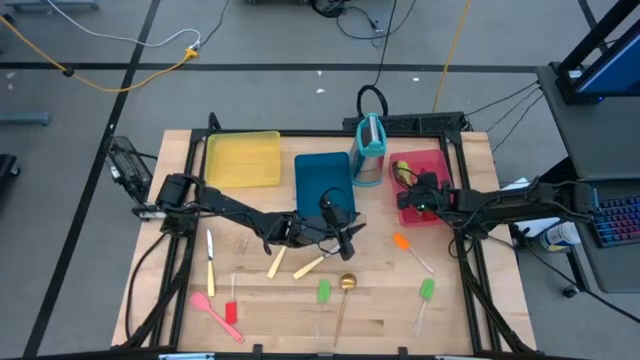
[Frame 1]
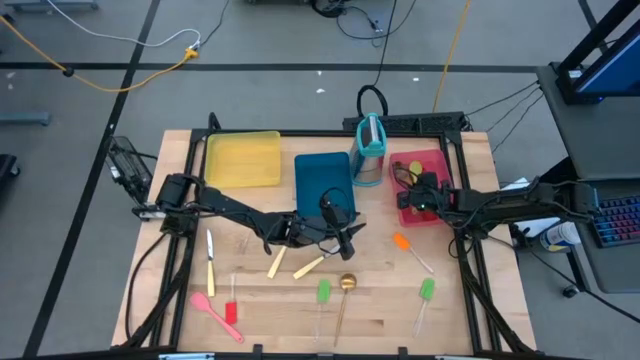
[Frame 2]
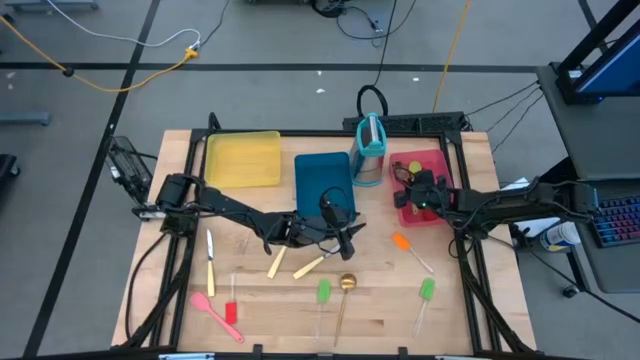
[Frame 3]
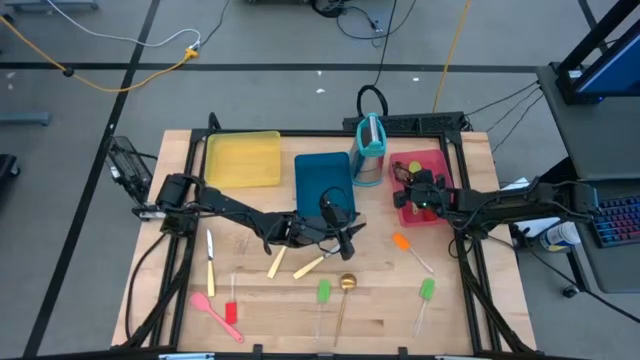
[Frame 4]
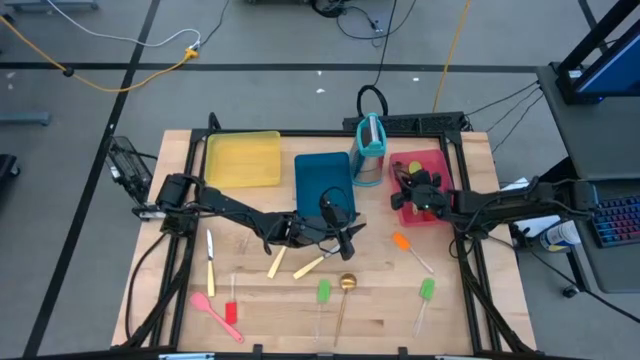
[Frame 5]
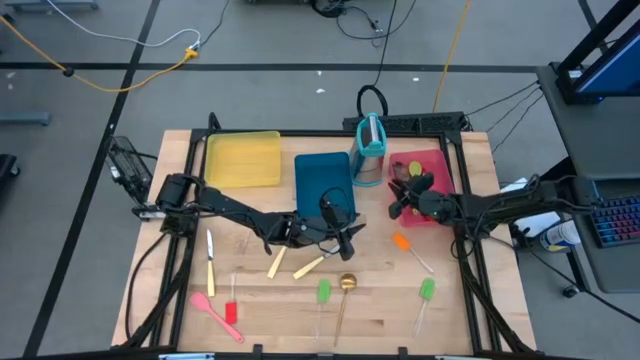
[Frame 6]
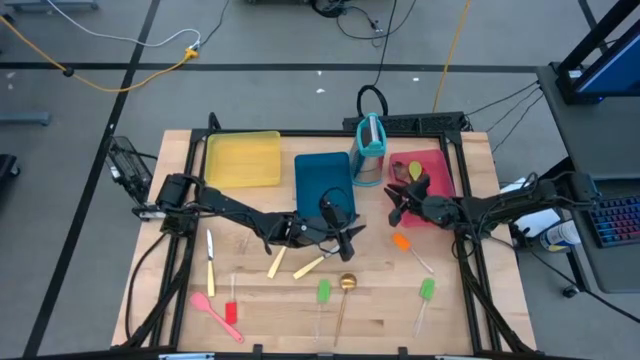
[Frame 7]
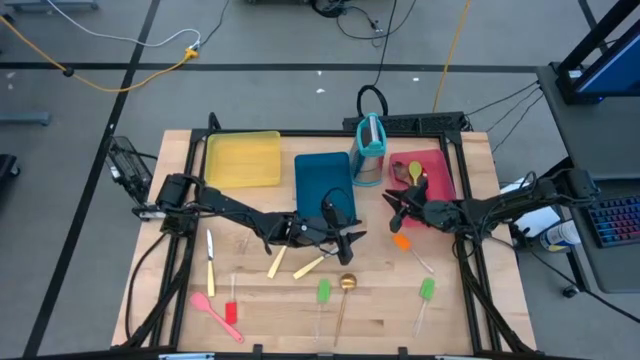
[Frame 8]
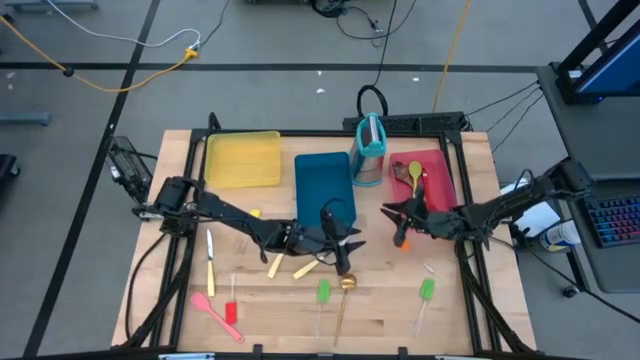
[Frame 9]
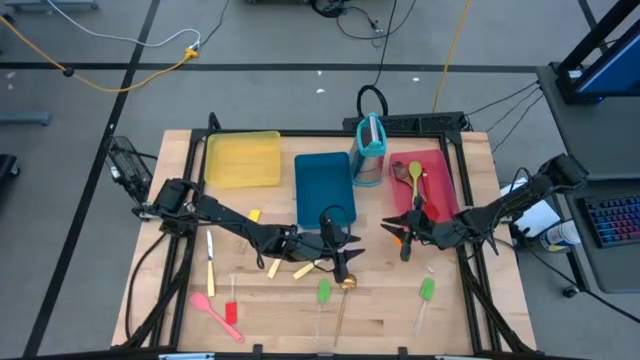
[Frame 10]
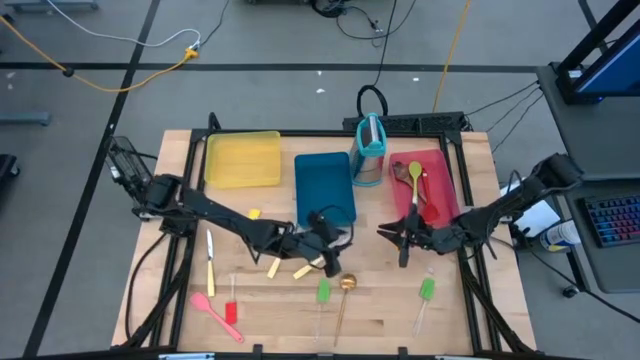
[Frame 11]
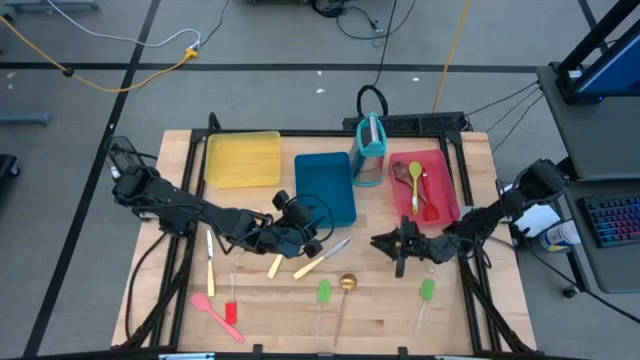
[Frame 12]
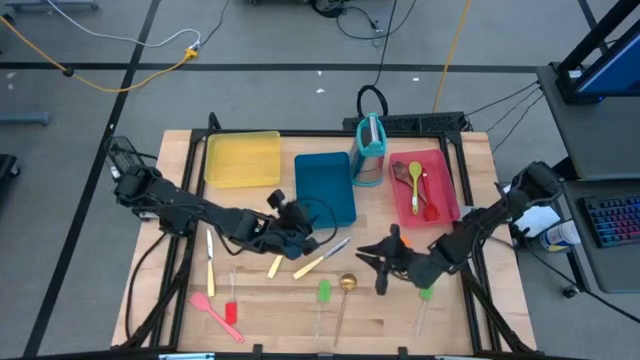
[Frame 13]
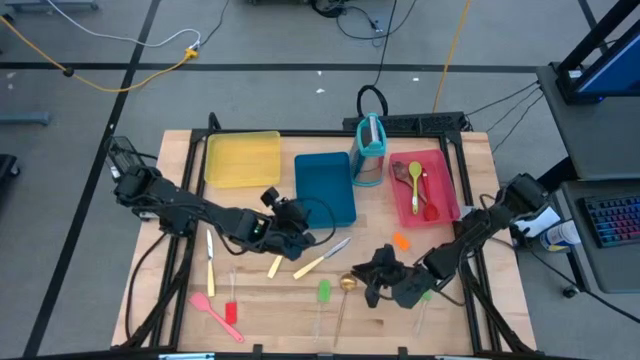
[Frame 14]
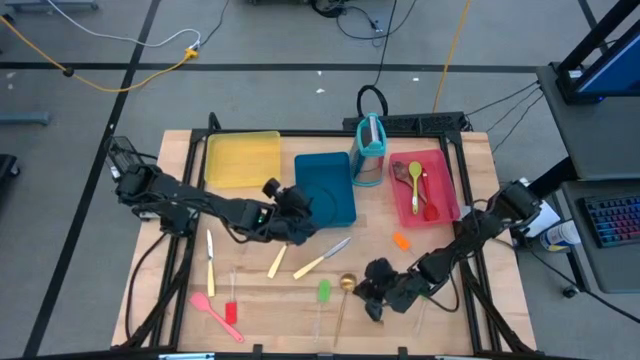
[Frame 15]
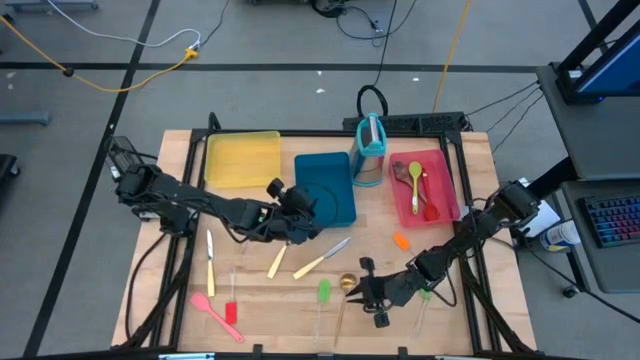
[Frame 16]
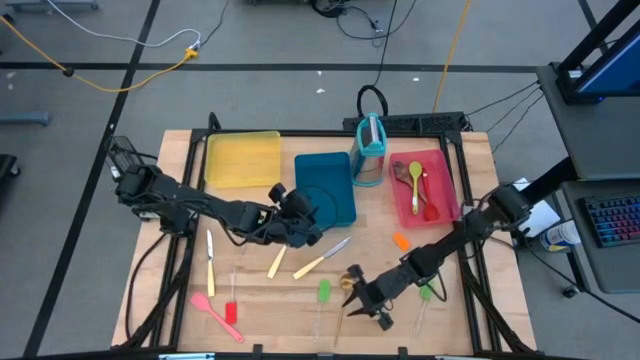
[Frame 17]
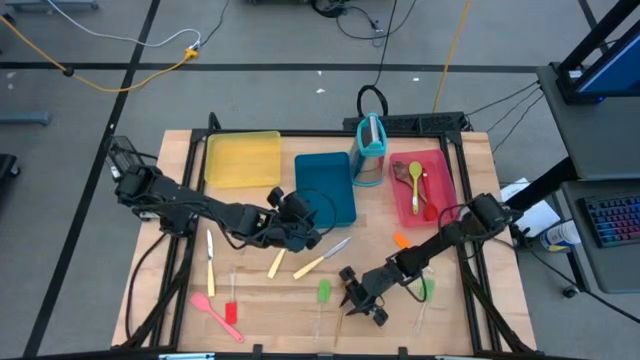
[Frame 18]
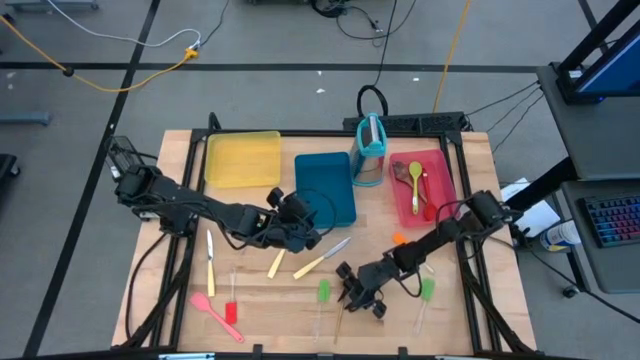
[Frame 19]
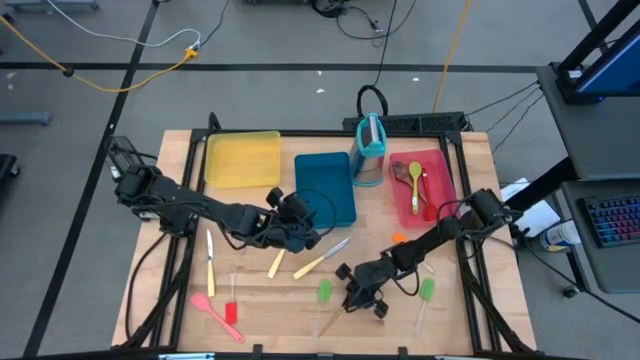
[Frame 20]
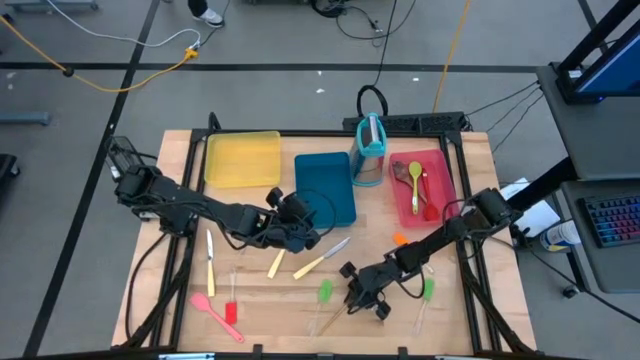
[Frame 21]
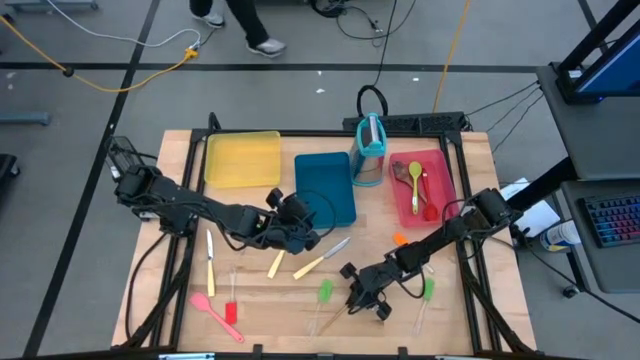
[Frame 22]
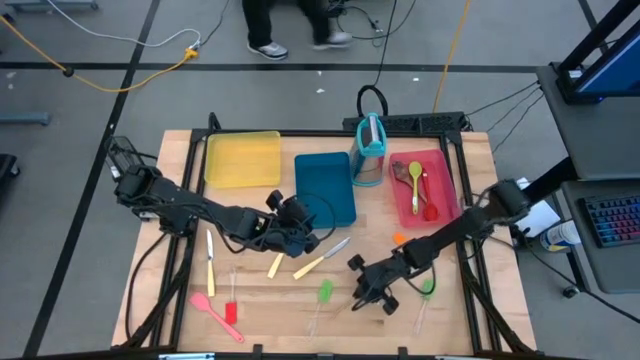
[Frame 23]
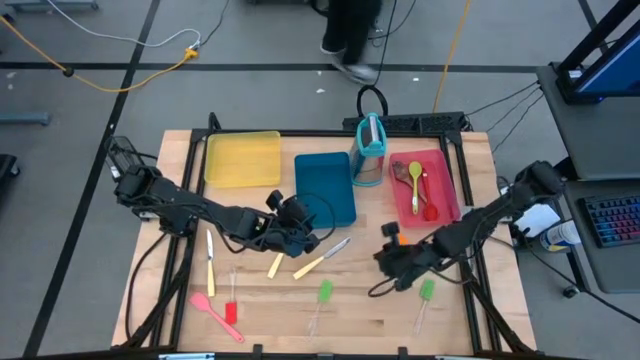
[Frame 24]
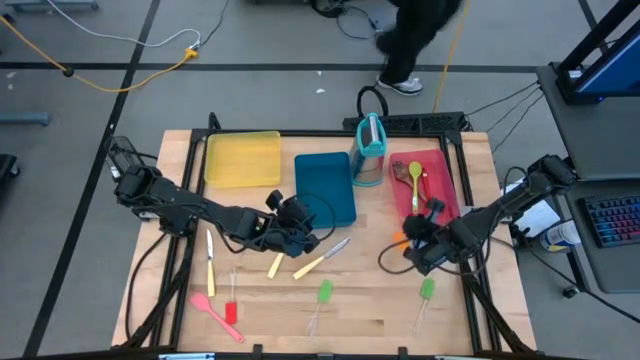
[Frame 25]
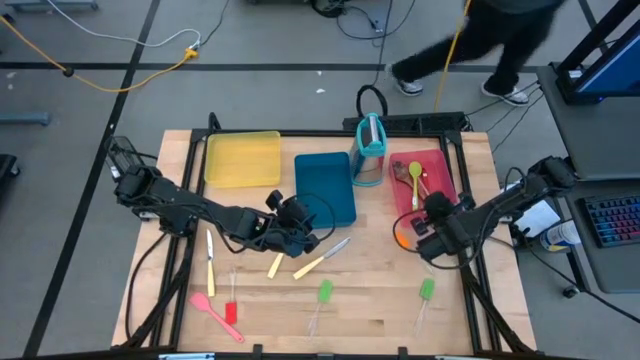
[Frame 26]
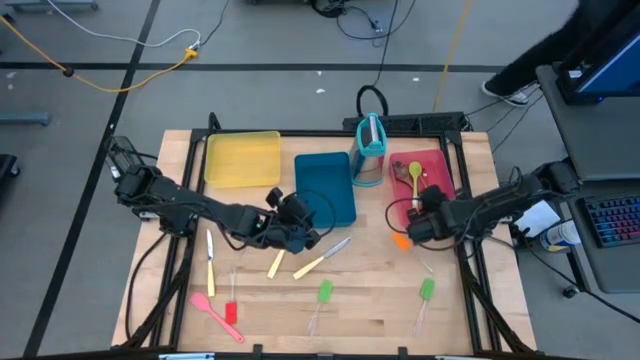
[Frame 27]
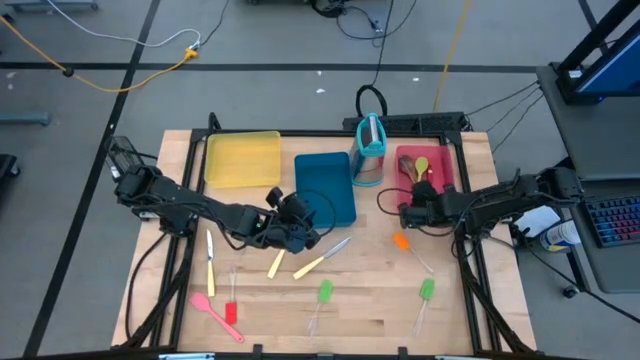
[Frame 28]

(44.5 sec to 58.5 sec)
Task: Pick & Place Kitchen Items
Put the gold serving spoon into the red bin

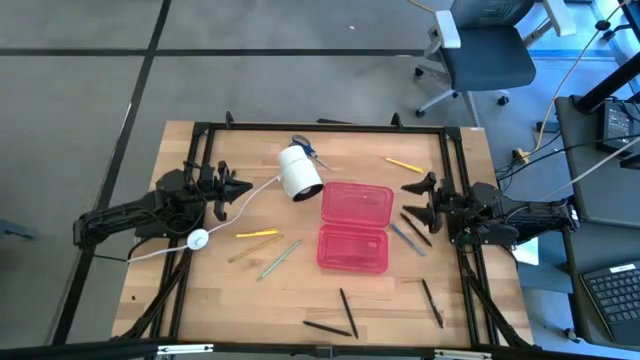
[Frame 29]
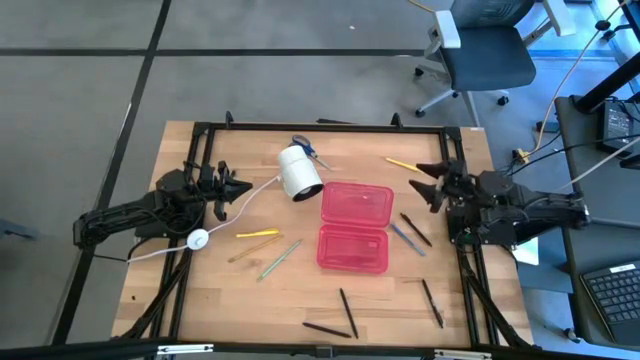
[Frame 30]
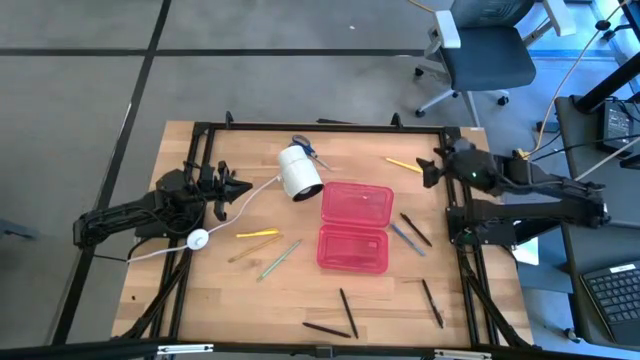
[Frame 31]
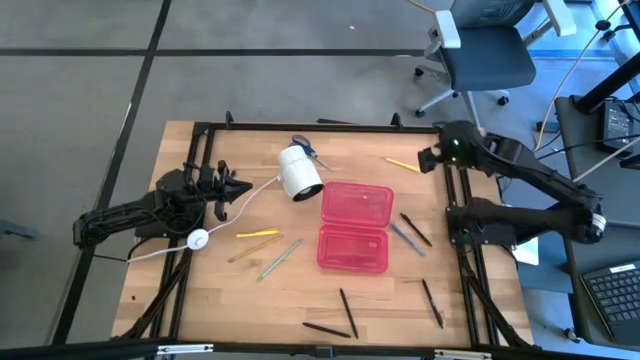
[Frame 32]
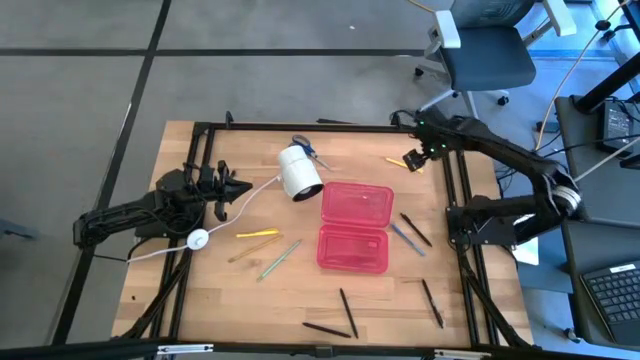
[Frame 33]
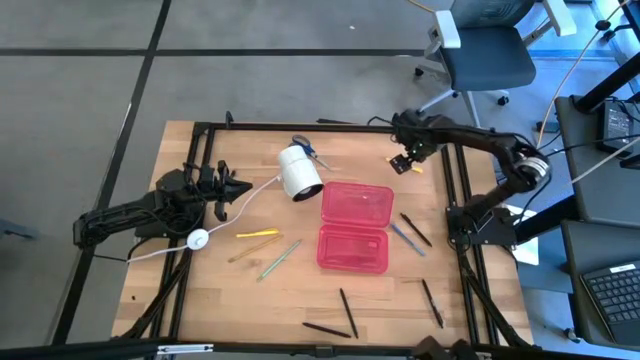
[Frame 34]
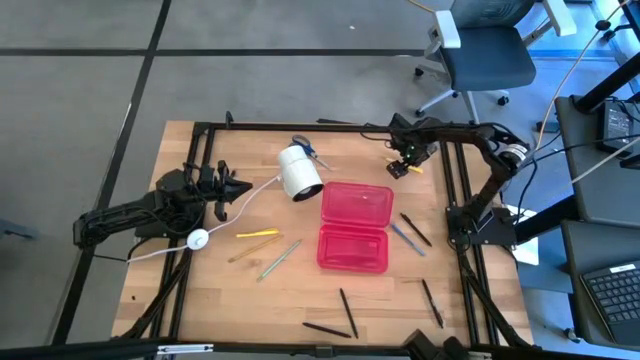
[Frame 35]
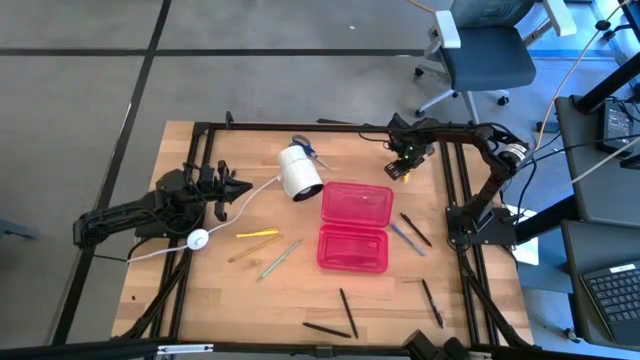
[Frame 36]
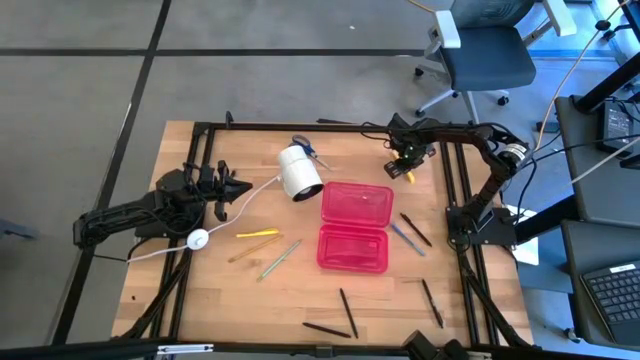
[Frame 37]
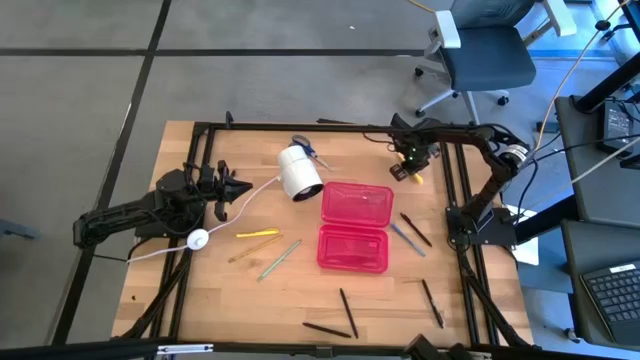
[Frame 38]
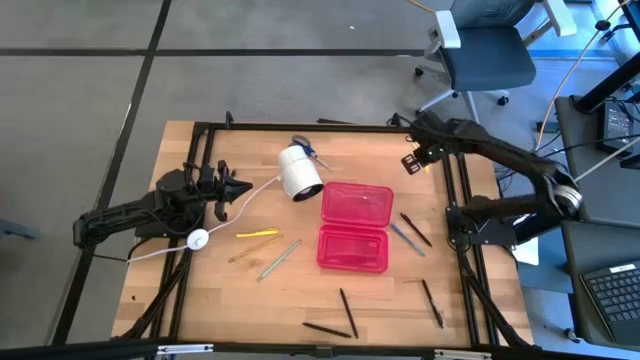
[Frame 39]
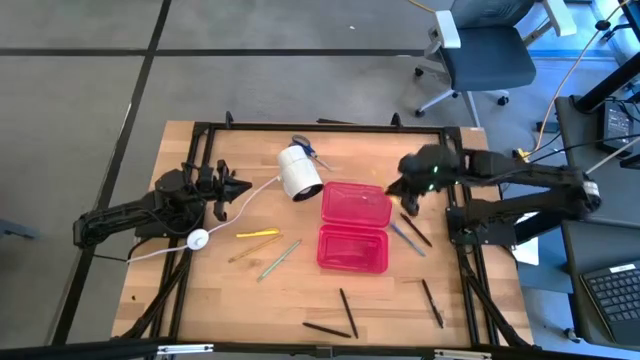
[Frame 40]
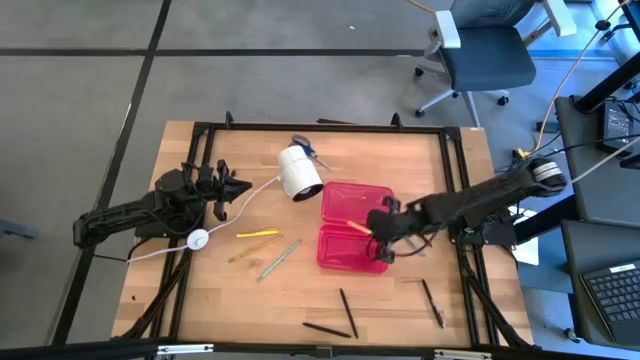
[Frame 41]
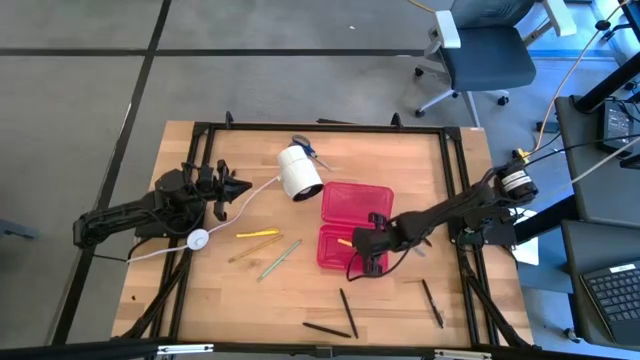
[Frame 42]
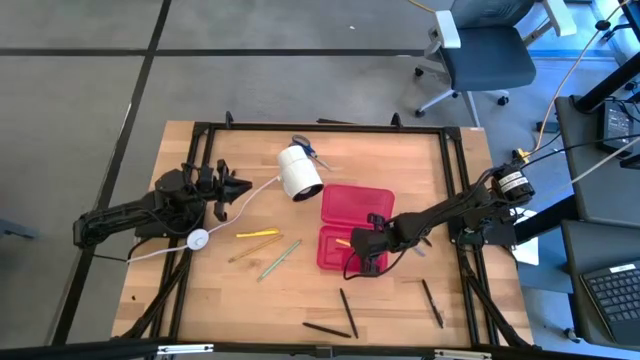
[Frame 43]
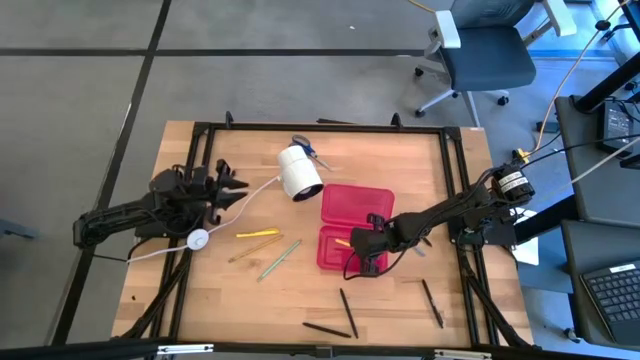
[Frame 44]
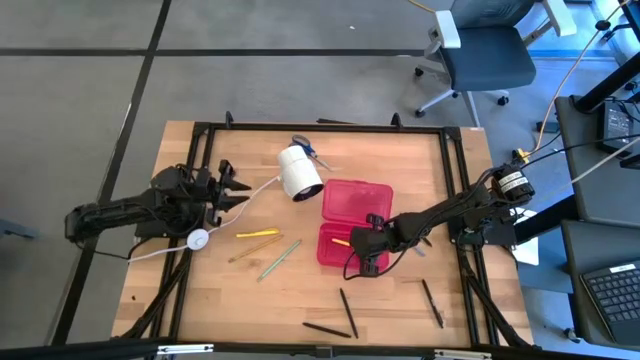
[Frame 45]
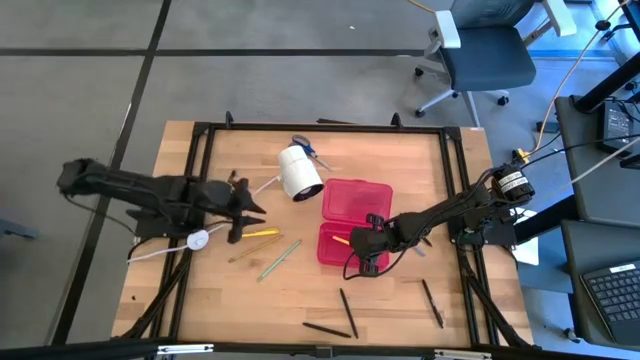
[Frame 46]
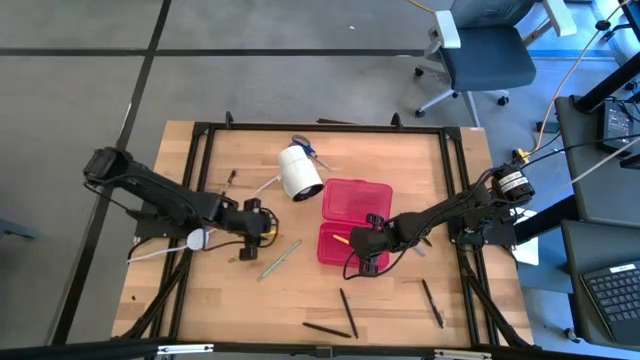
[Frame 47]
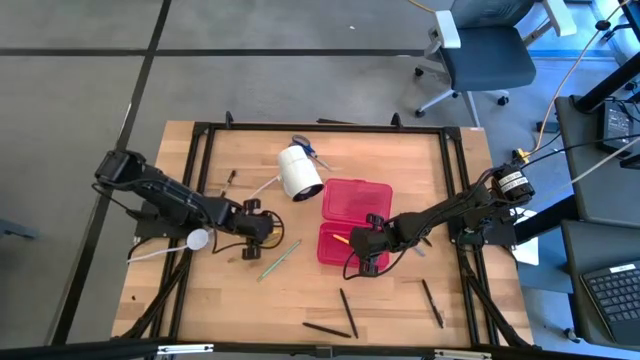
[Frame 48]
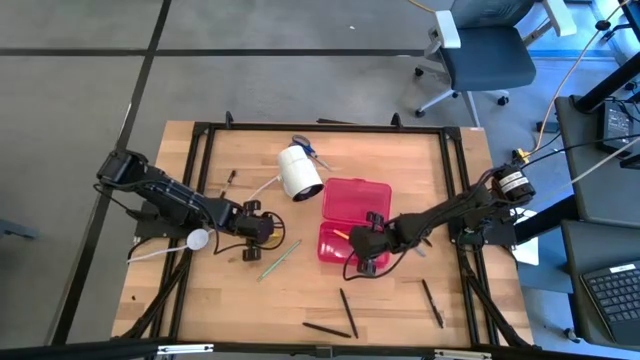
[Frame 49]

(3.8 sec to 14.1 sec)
Task: Pick & place school supplies into a supply box
Put the yellow pen into the pink supply box
